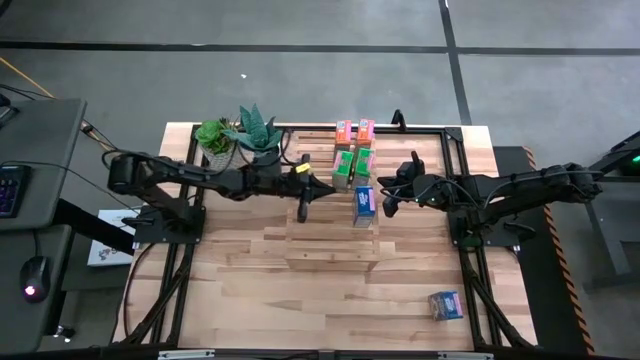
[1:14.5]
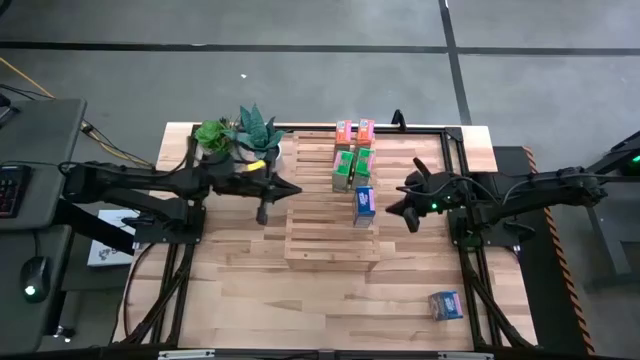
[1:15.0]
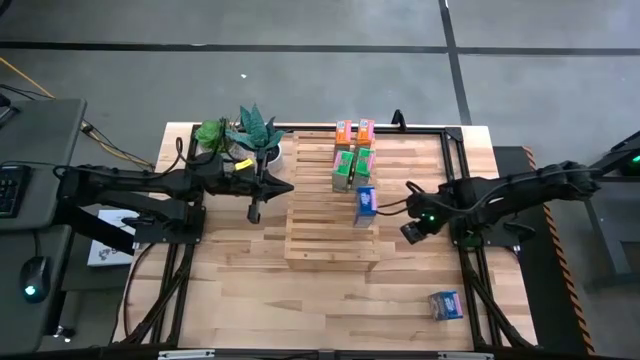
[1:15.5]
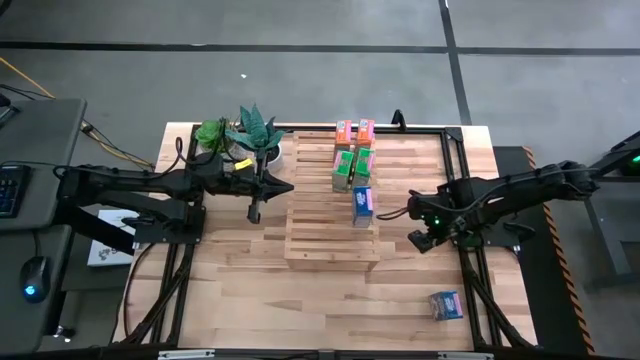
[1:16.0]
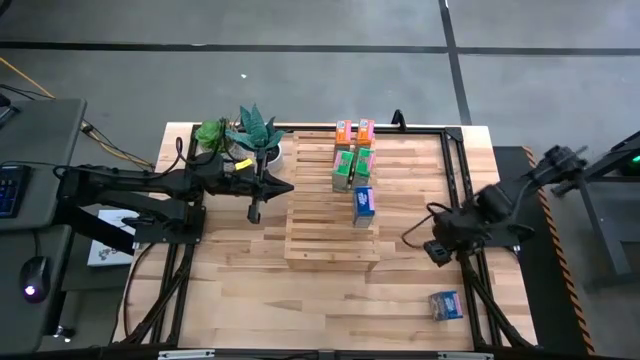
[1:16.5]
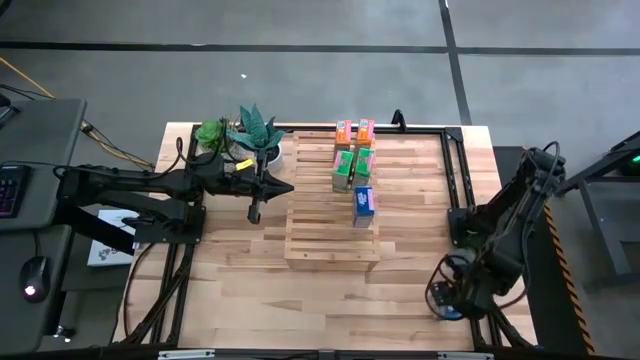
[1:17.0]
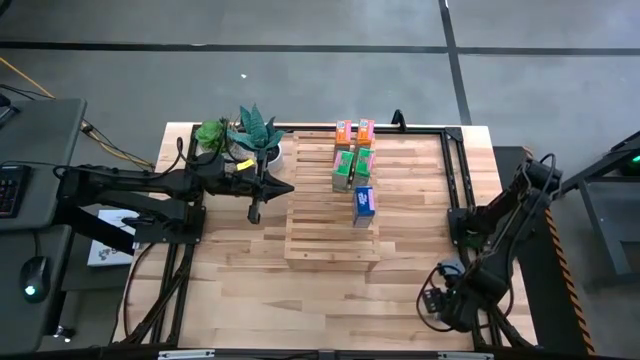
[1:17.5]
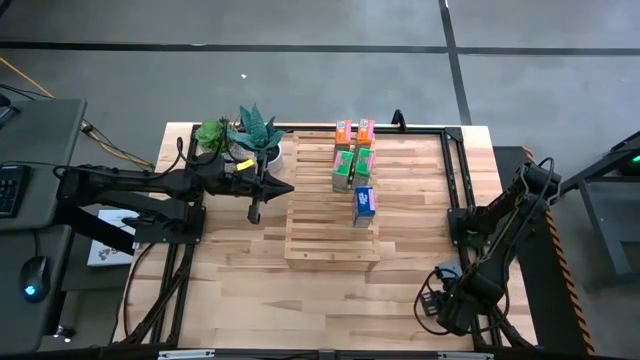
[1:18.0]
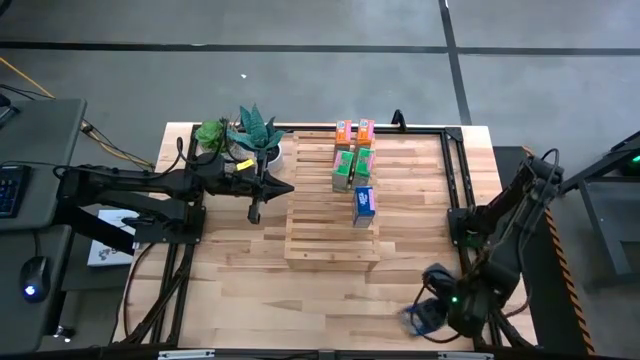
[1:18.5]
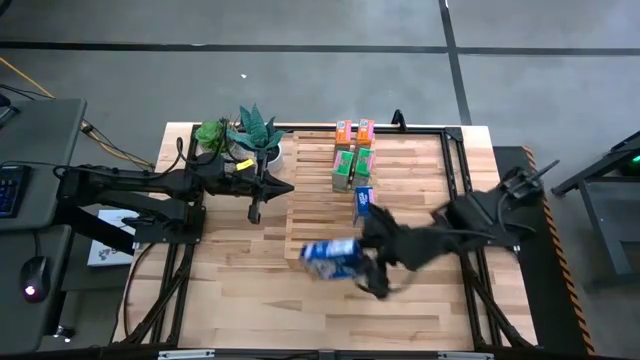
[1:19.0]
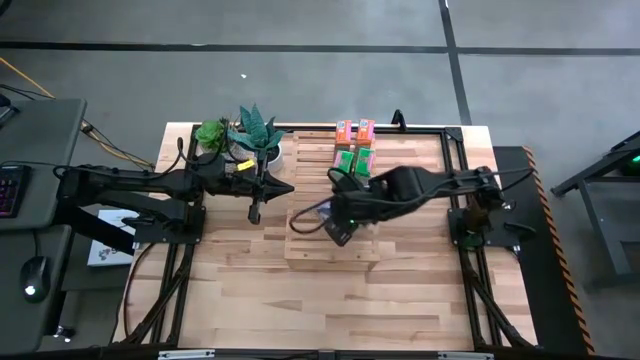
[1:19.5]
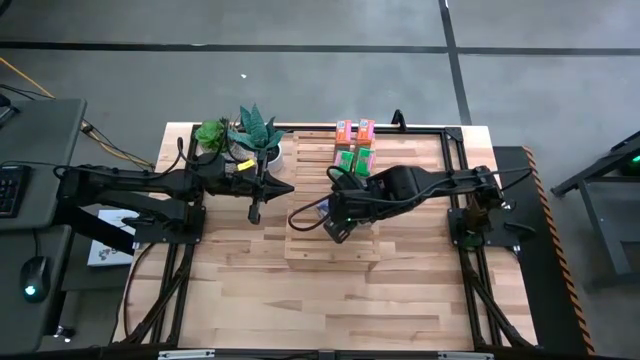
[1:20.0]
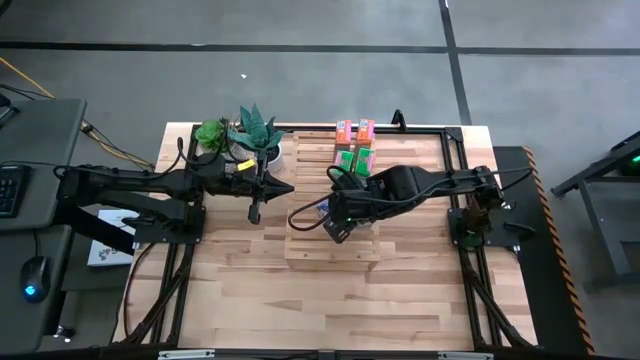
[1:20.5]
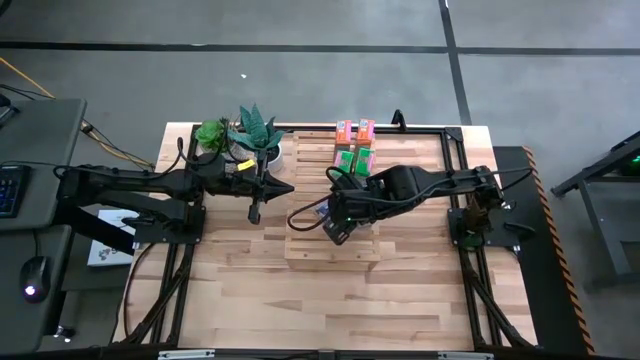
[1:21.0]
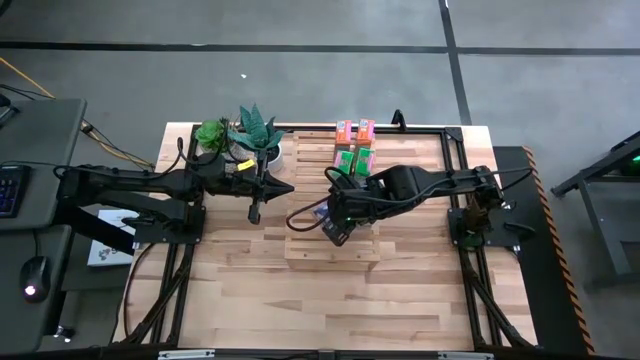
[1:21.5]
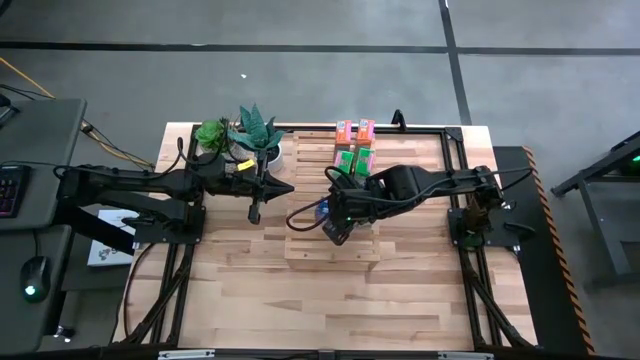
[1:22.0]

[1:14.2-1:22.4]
Task: Stack cereal on shelf
Put the blue cereal box on the shelf aligned with the other blue cereal box

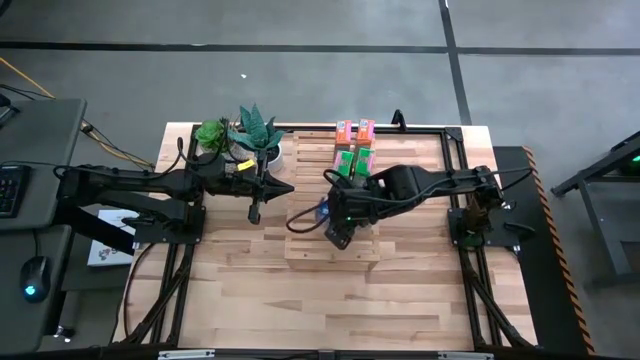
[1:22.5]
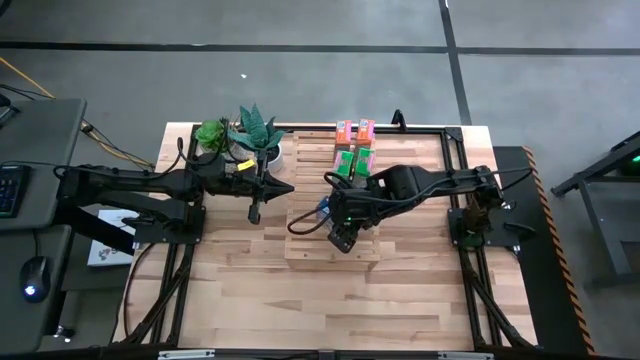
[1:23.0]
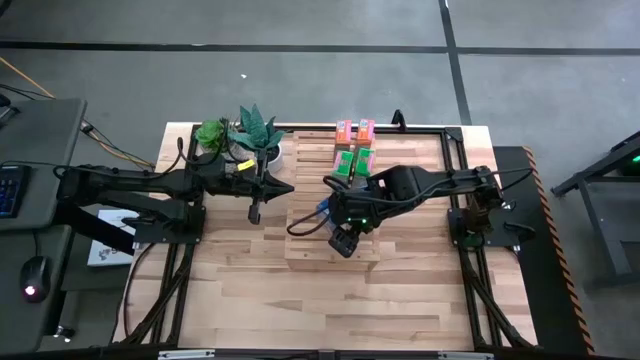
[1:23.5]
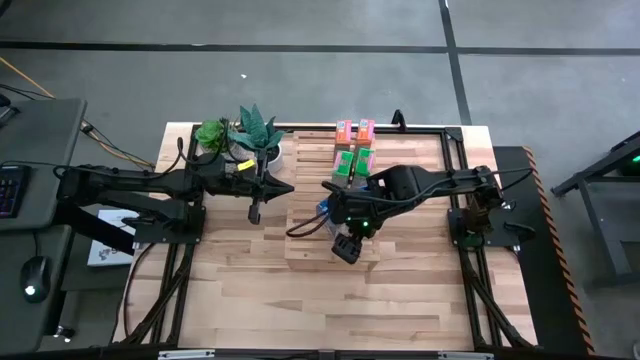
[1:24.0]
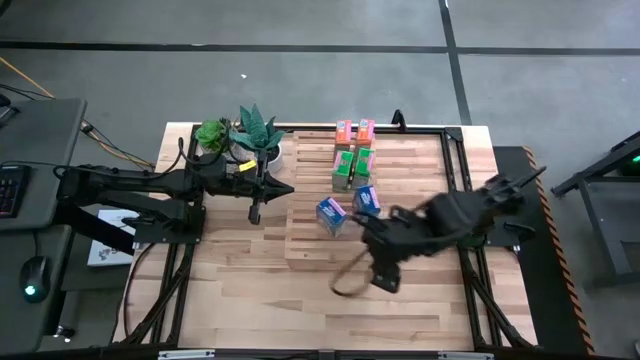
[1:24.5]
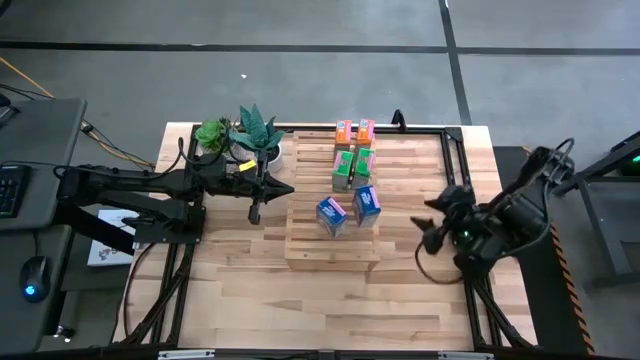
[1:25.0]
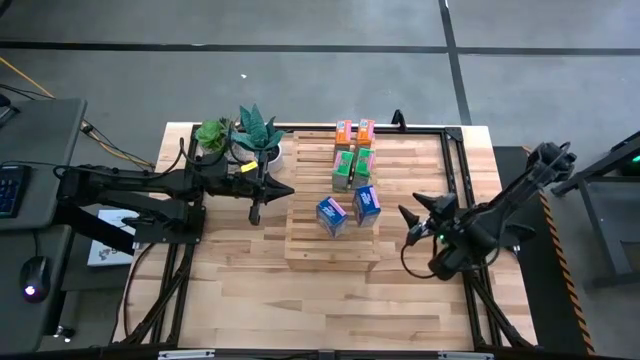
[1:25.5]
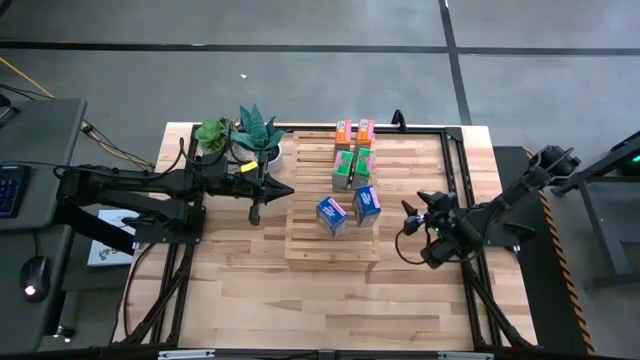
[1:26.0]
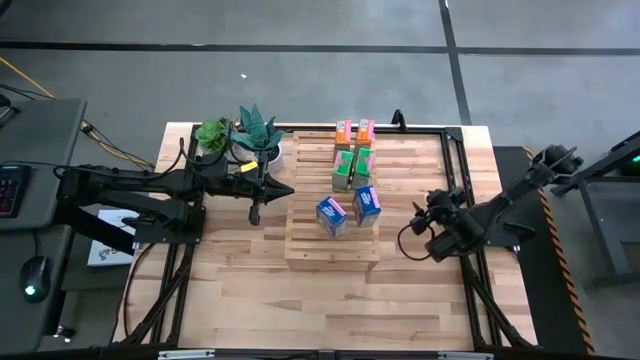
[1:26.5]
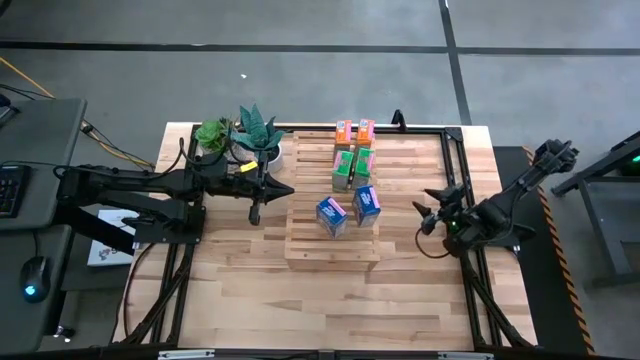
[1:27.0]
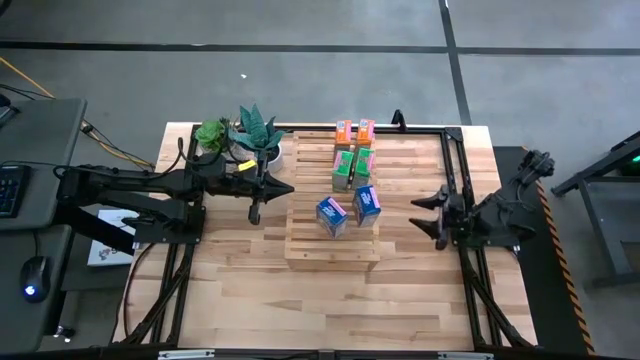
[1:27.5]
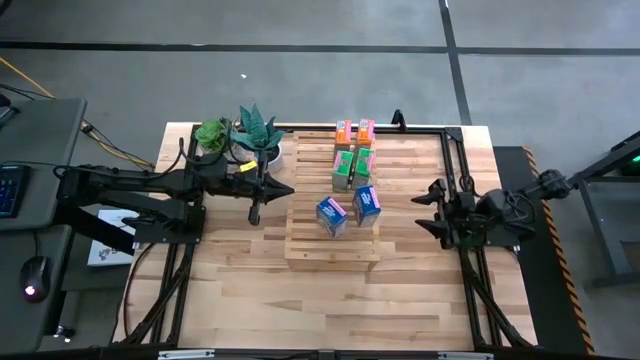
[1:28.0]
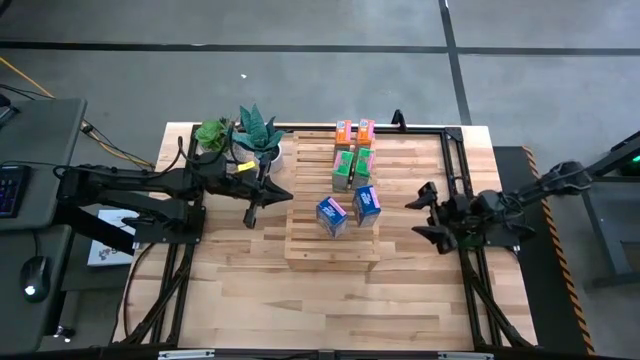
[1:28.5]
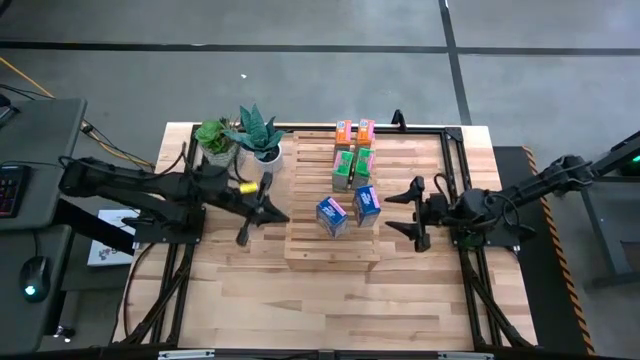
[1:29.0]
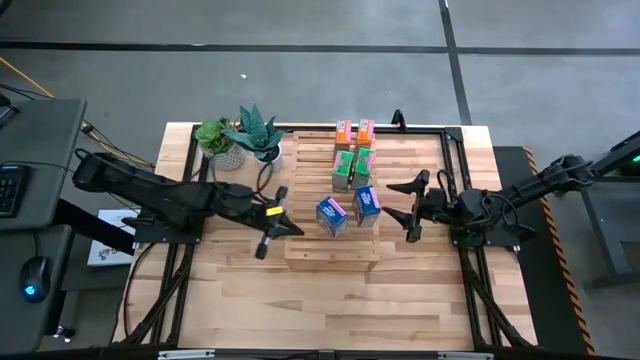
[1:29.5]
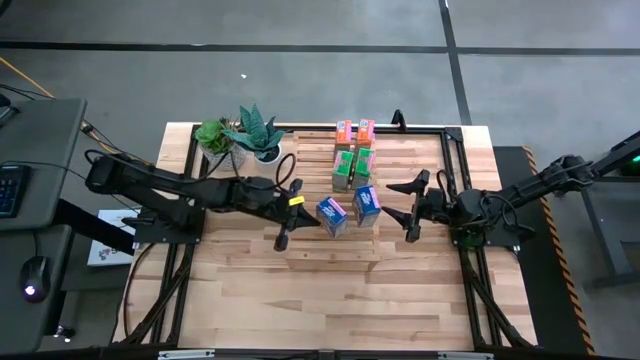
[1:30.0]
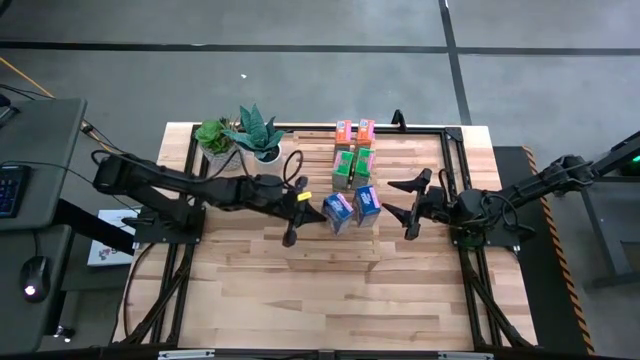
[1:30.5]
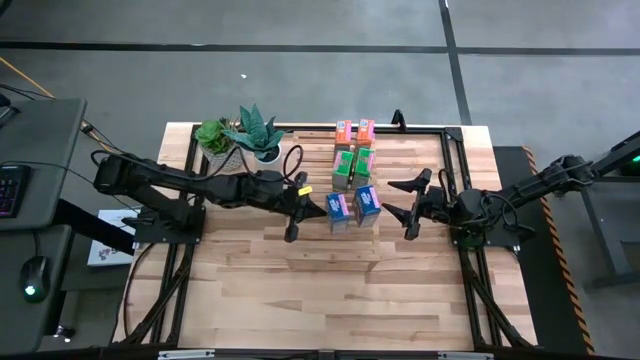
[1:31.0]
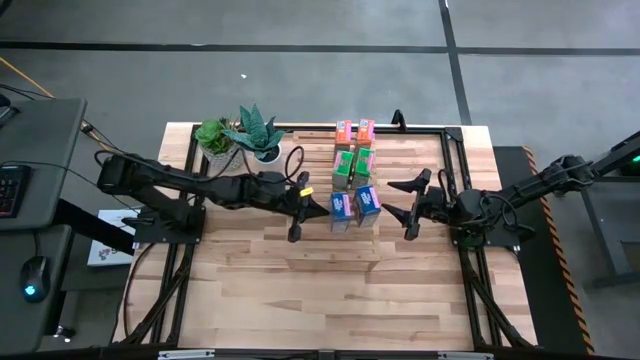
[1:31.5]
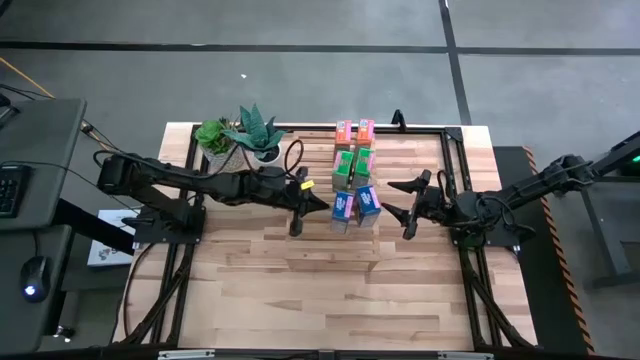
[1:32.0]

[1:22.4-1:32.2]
Adjust the blue cereal boxes on the shelf

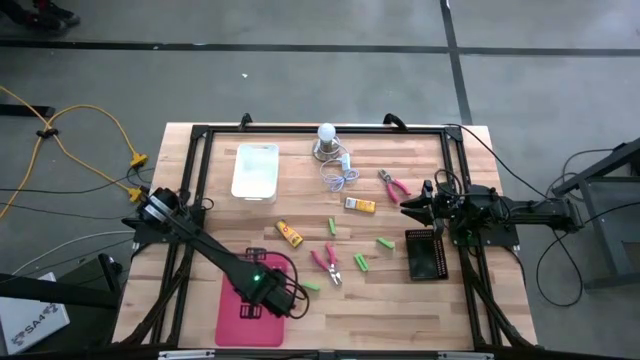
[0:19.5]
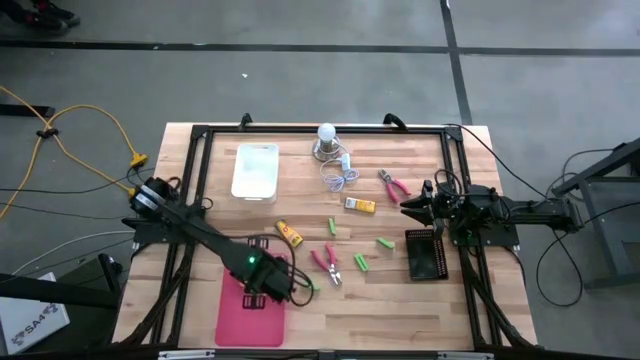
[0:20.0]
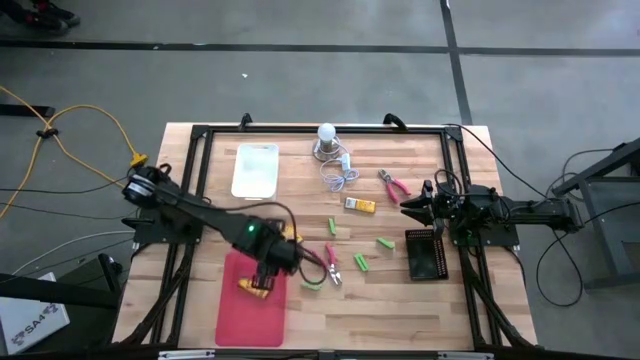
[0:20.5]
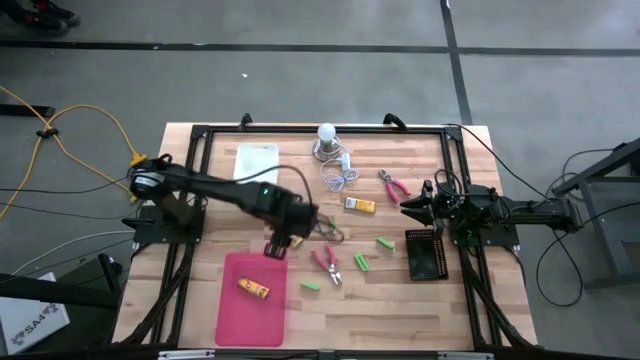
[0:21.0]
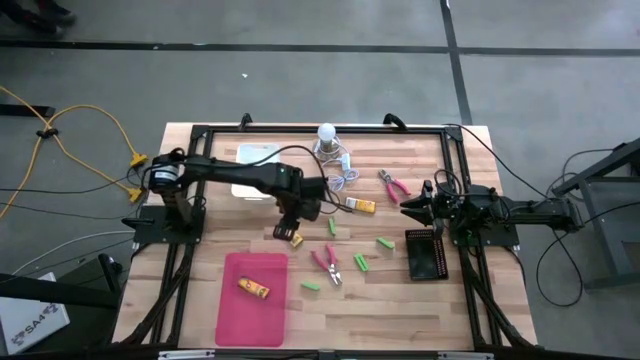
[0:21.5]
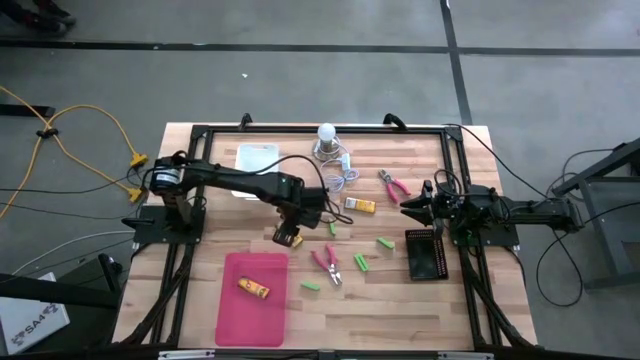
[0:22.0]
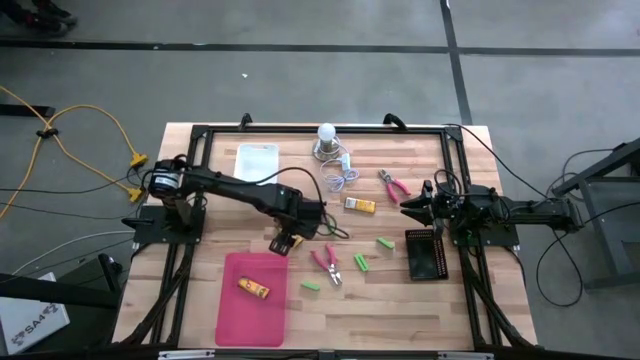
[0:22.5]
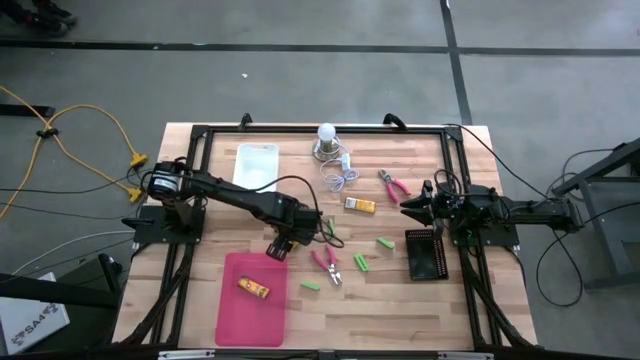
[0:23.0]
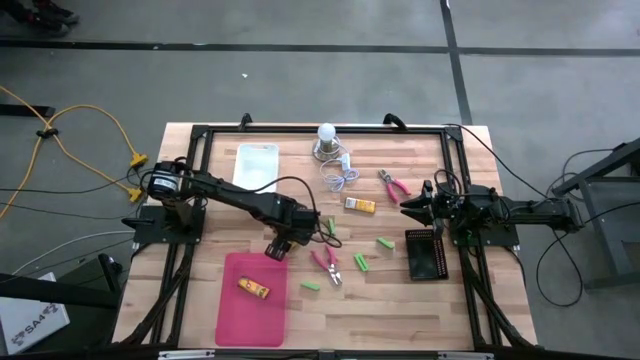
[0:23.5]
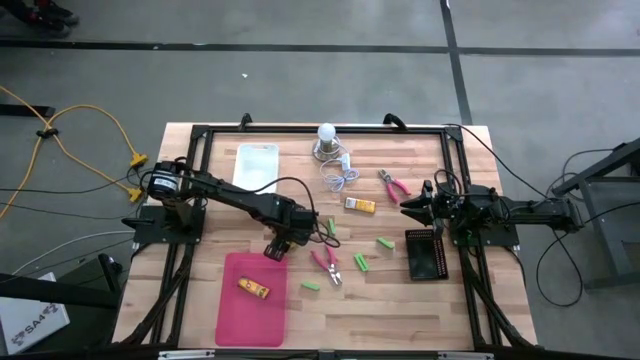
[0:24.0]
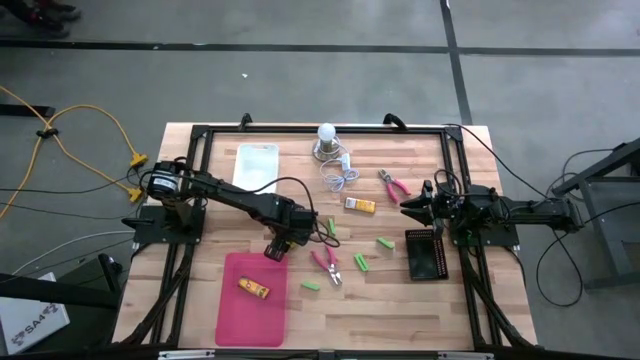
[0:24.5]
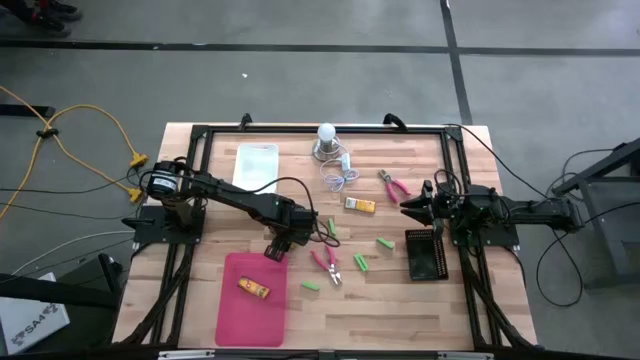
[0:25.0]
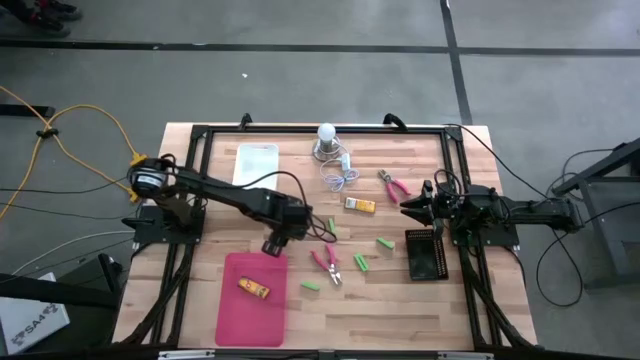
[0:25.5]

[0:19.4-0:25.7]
Task: Pick & Place School Supplies
Put the bottom crayon box into the pink bin
